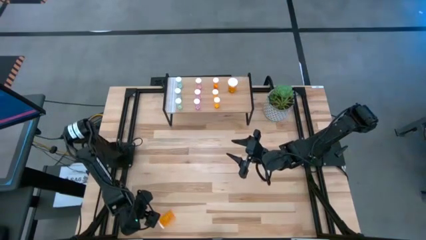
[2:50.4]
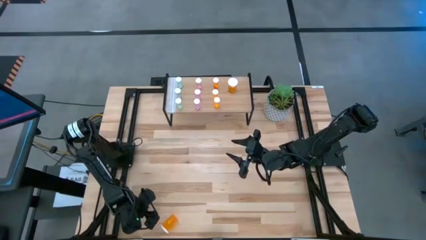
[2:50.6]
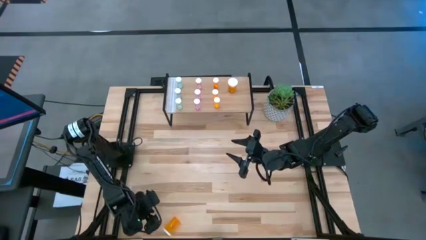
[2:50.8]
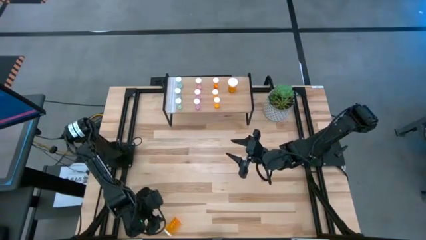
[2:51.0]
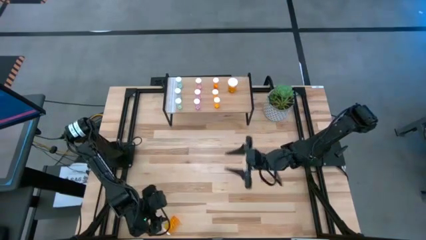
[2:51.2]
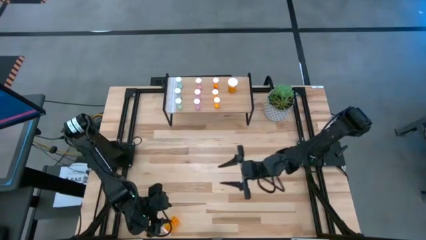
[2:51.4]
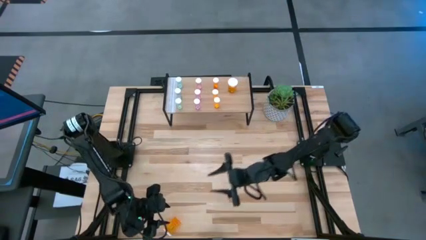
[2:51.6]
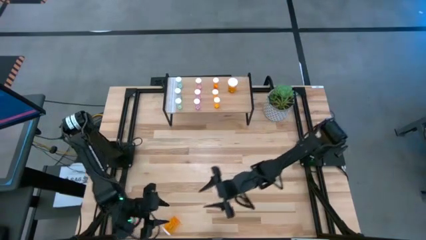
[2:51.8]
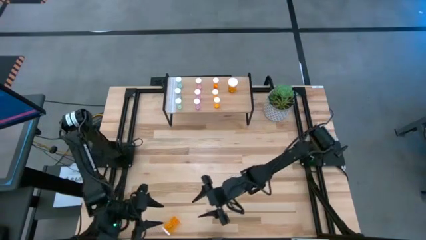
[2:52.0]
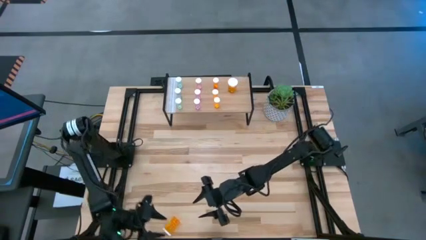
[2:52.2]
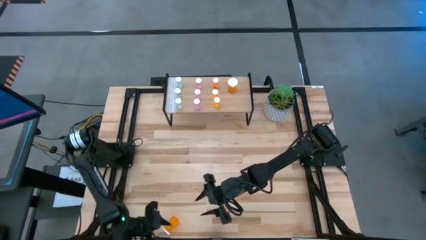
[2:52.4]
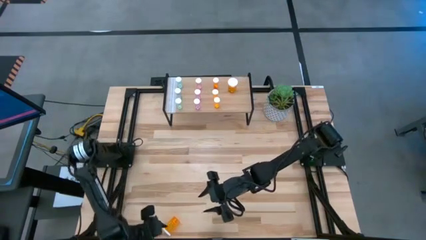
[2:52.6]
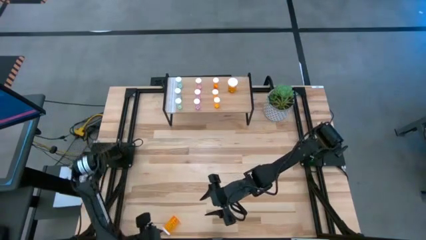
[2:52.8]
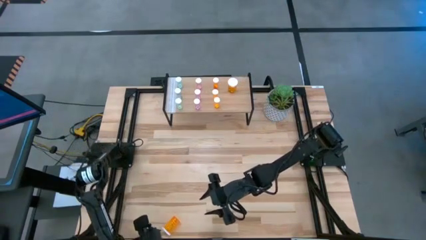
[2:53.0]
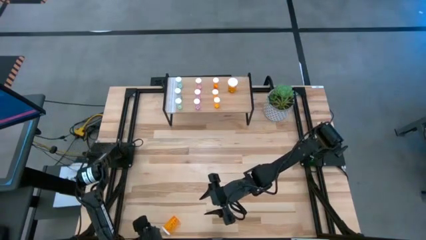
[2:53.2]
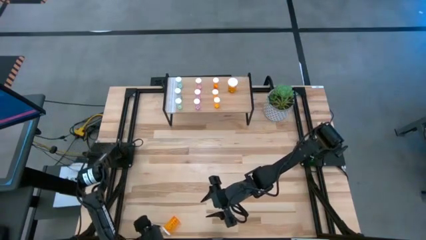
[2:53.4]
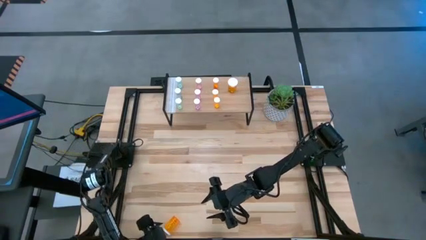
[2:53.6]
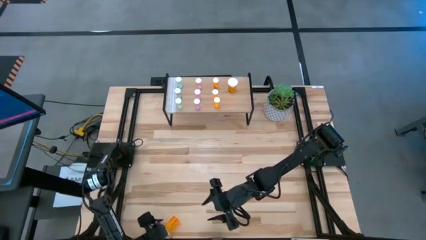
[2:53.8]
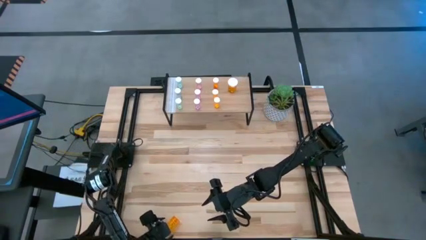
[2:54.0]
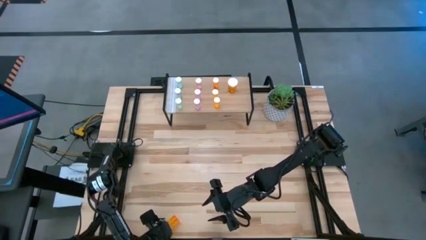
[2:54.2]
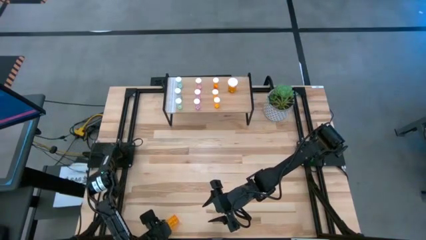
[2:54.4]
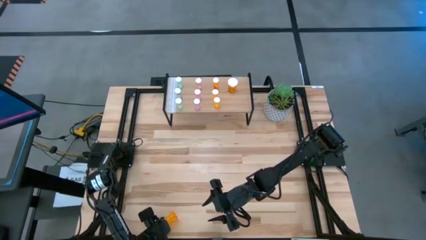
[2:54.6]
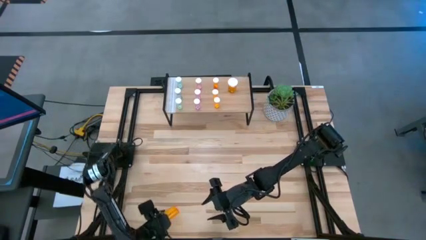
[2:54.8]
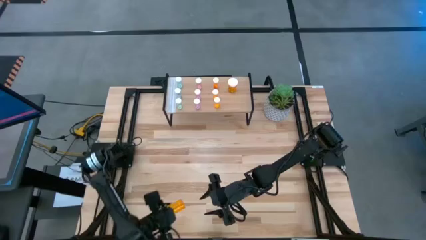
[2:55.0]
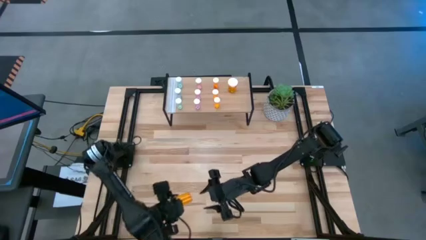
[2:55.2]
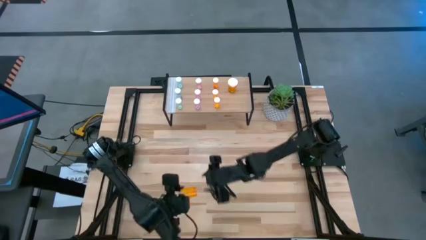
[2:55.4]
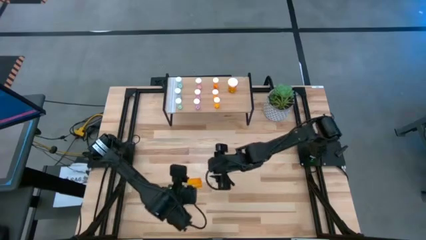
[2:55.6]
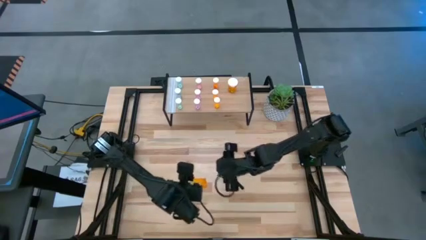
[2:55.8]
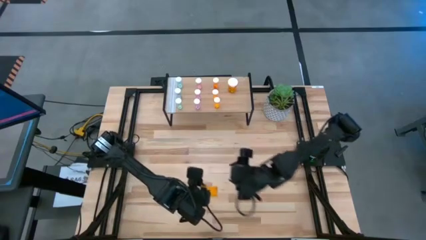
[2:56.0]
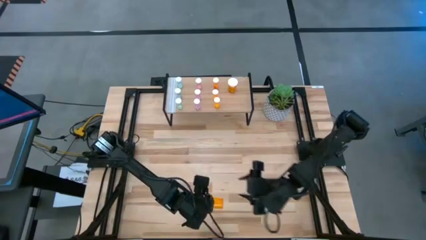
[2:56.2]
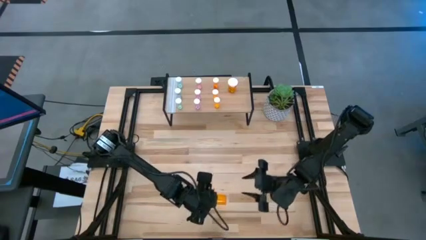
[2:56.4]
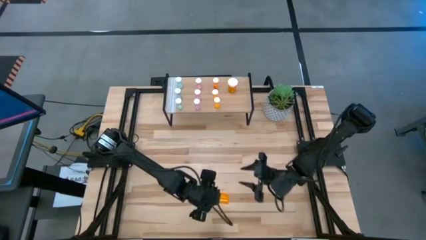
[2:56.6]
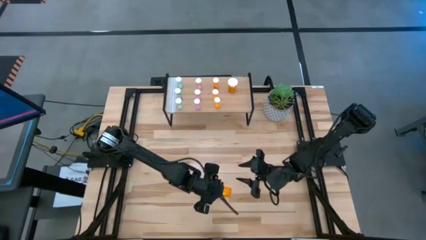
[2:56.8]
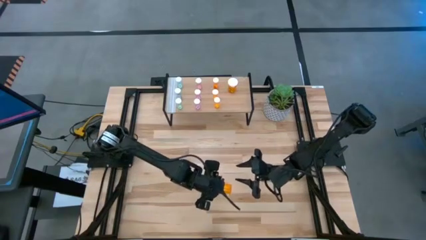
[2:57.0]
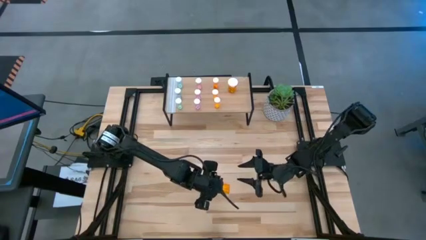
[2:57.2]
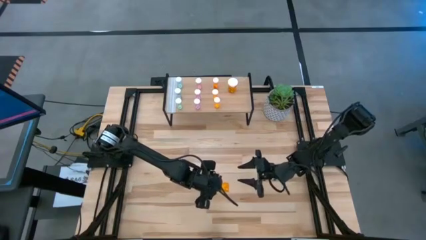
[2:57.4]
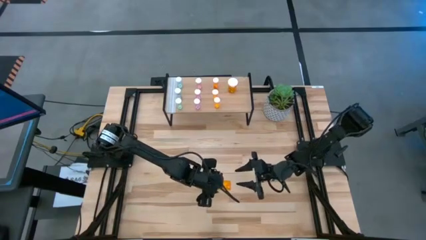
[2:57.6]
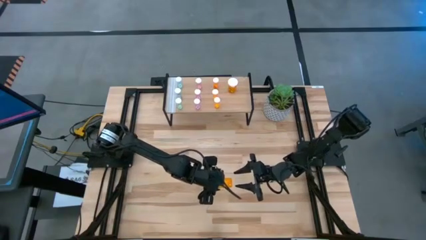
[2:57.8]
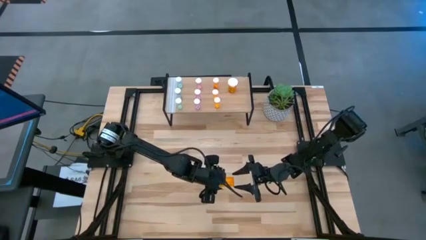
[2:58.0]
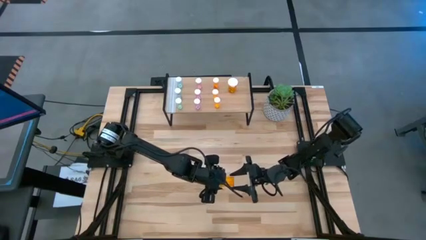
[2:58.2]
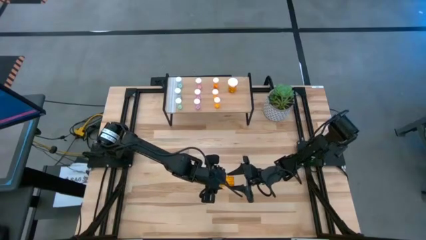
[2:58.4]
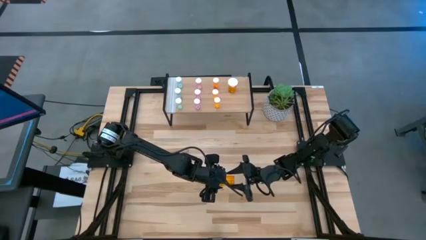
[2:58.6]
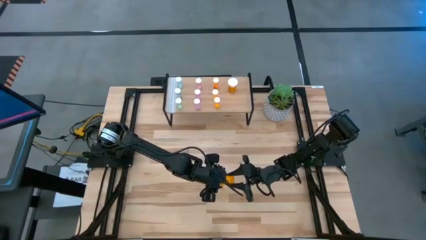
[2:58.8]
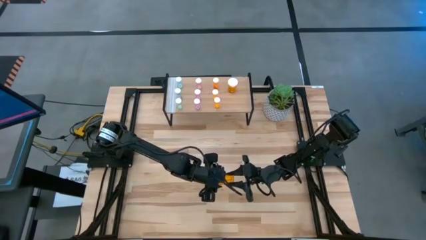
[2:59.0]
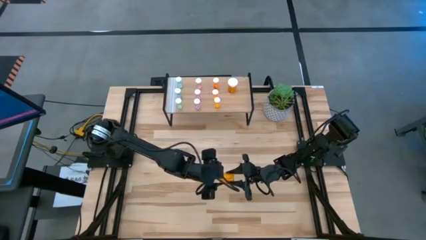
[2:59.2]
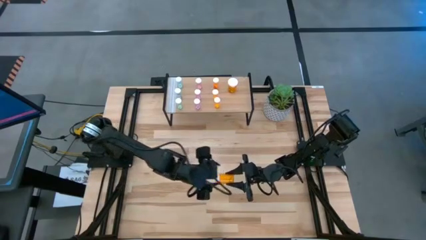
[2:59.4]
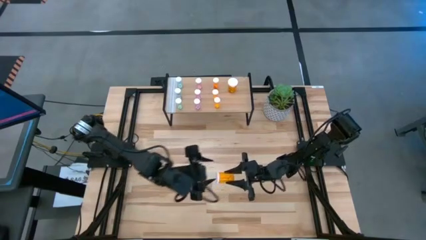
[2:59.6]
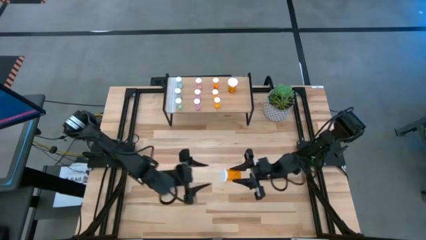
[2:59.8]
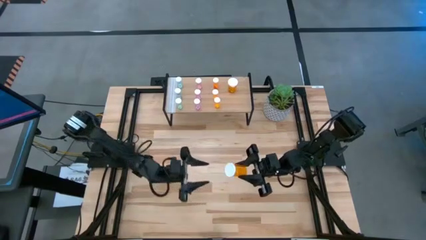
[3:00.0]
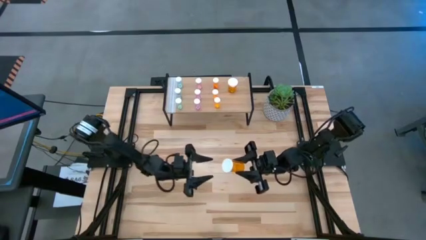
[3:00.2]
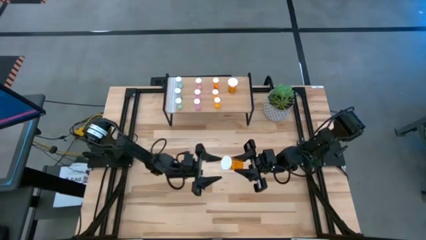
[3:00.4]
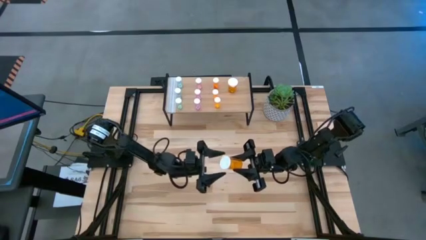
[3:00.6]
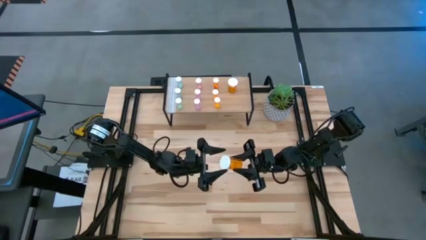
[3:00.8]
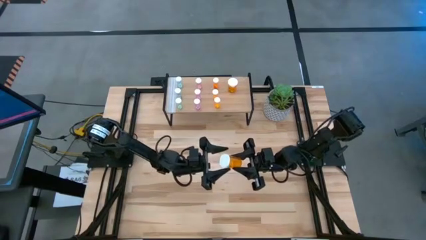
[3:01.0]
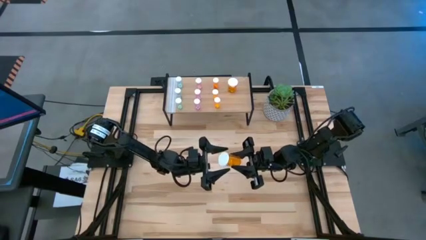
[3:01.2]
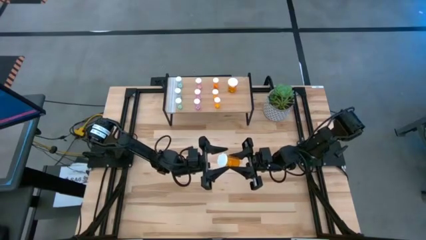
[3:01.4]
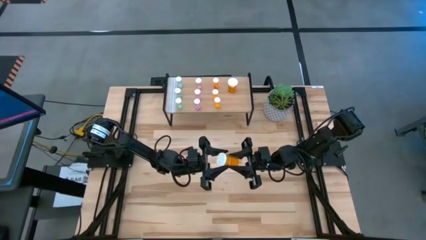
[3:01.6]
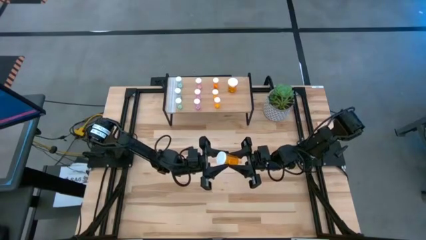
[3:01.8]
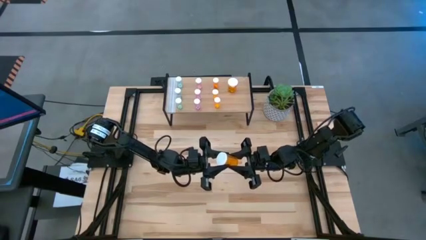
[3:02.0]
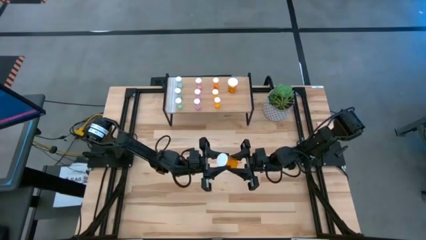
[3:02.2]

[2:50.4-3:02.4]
Task: Pick and place medicine bottles onto shelf by color
Put the large orange pill bottle on the shelf aligned with the other large orange pill bottle

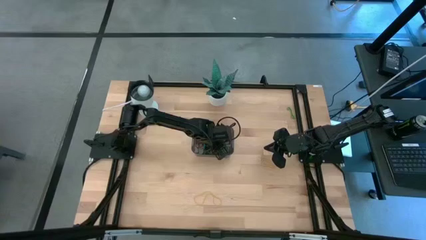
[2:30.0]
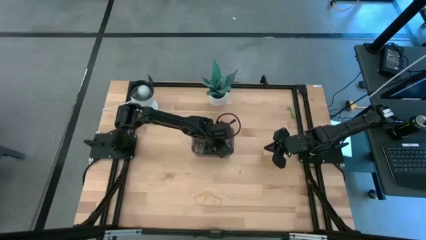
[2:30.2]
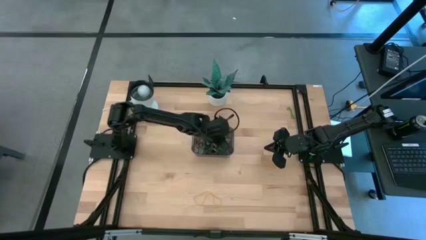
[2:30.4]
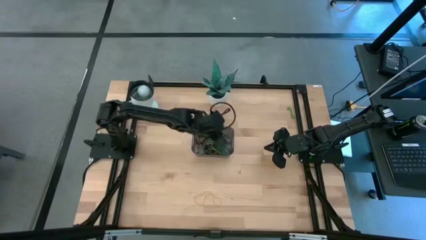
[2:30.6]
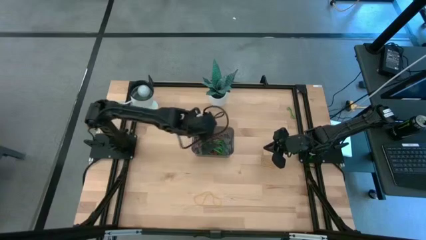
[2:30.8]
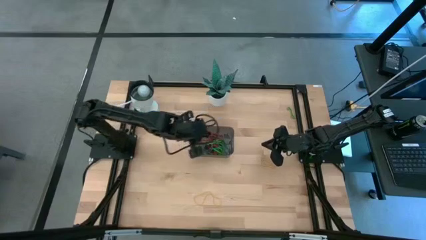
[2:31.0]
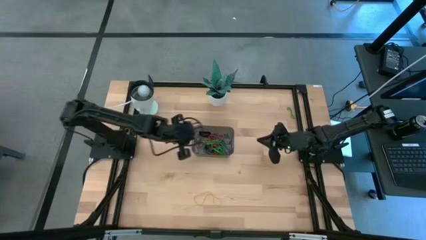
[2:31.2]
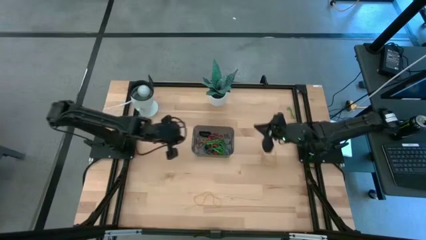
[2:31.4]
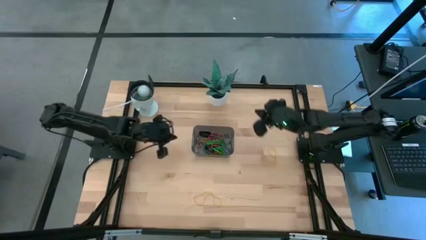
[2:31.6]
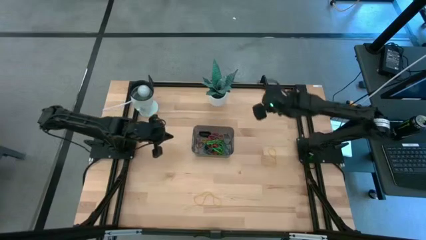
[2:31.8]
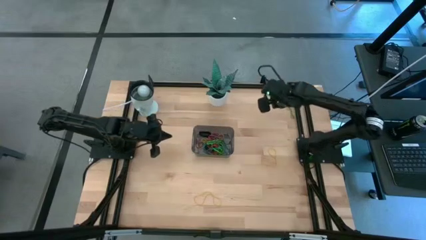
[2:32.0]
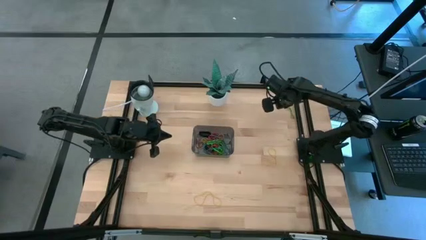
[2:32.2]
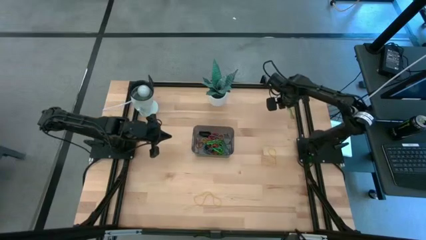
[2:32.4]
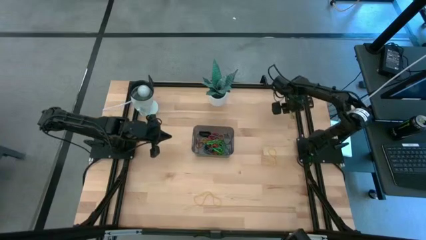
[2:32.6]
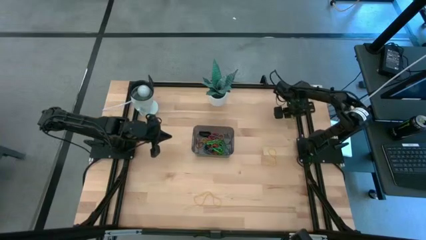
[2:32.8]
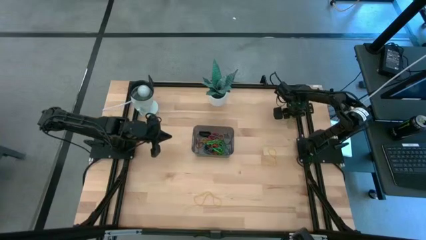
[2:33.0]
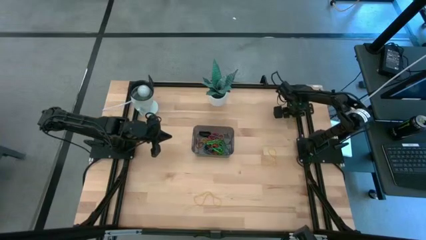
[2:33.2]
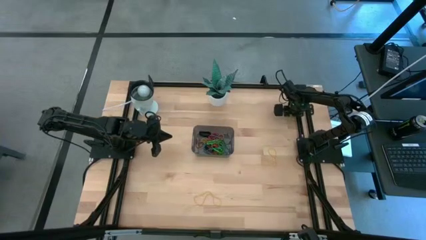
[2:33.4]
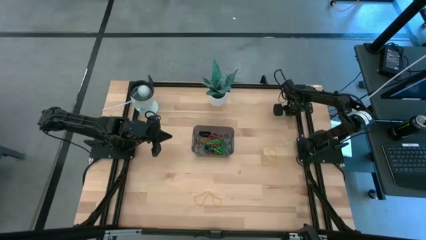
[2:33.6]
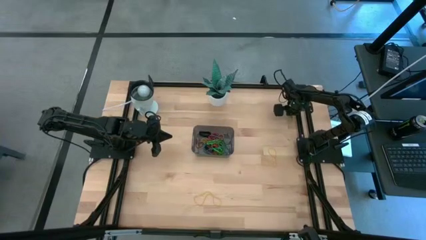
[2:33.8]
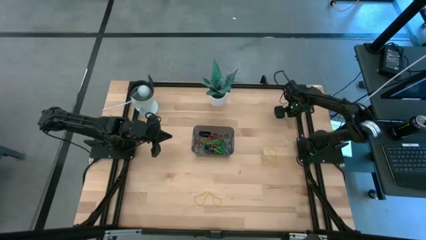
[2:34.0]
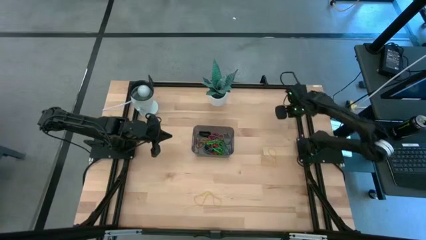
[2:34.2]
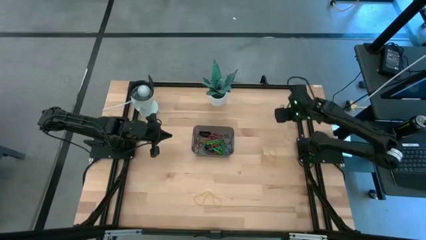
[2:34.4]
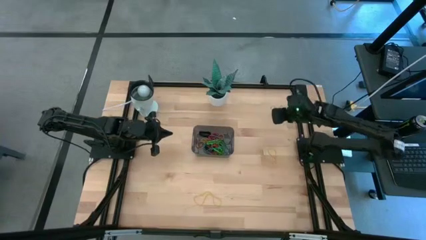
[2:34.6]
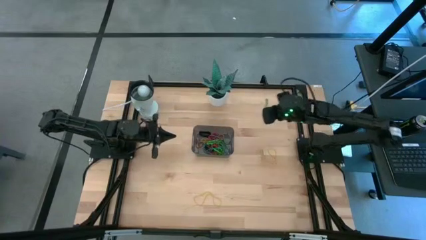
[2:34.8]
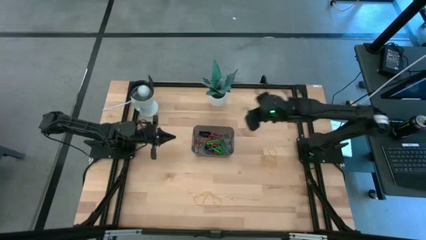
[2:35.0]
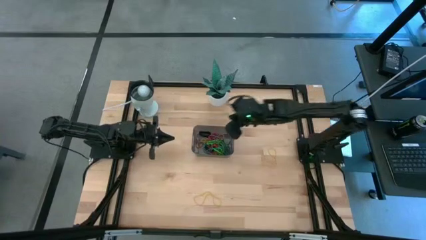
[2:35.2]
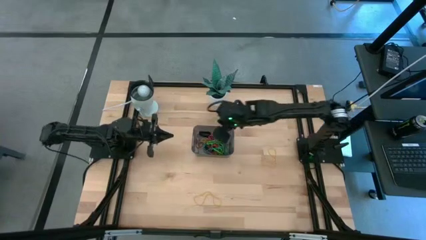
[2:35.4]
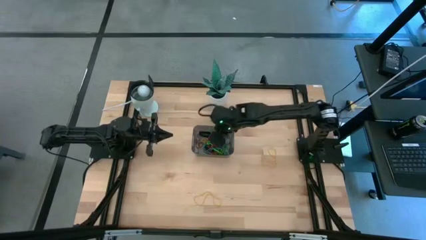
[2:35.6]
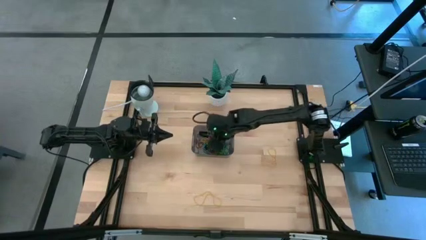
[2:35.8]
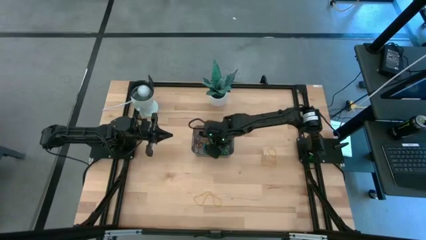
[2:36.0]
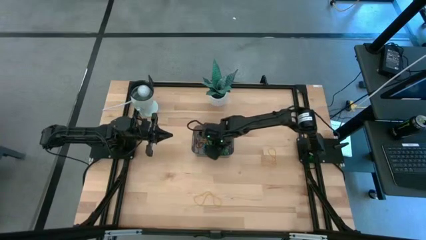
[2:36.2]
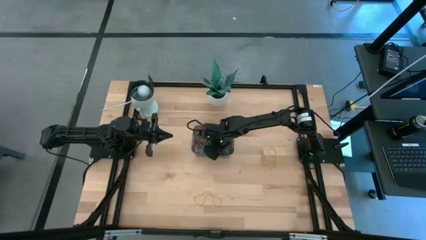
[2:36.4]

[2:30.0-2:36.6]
Task: Pick and place rubber bands into bin
Put the green rubber band into the black bin
